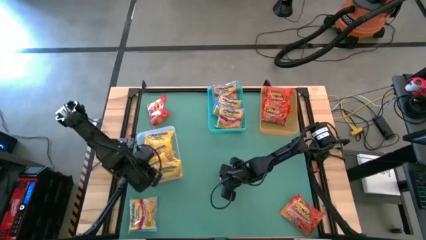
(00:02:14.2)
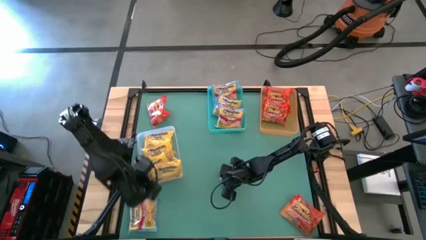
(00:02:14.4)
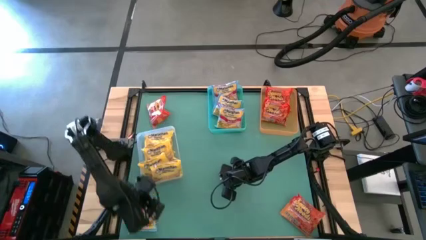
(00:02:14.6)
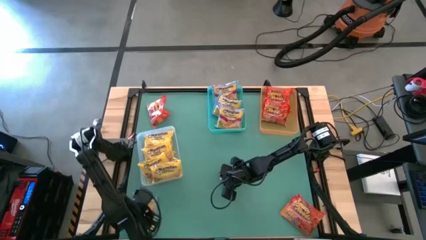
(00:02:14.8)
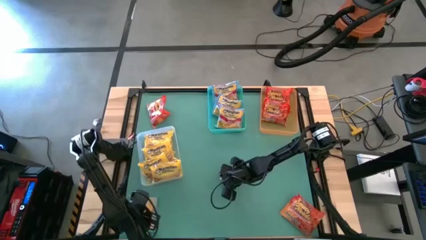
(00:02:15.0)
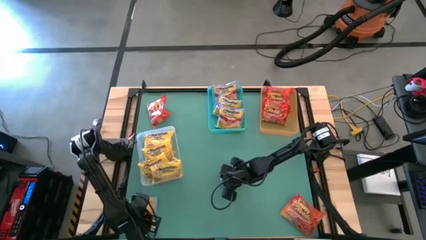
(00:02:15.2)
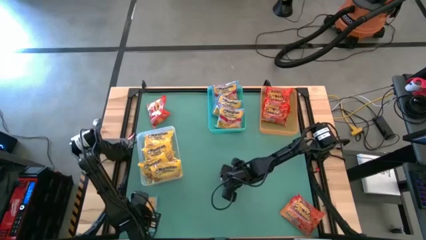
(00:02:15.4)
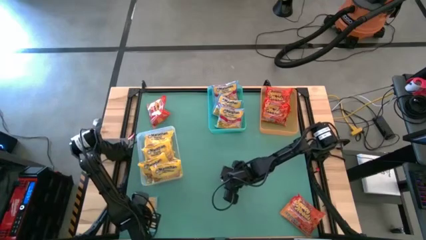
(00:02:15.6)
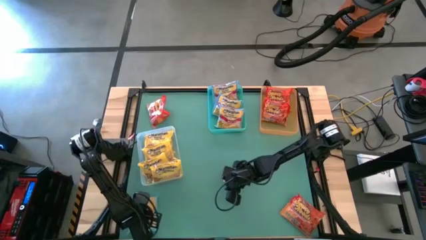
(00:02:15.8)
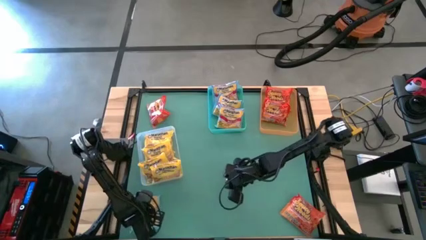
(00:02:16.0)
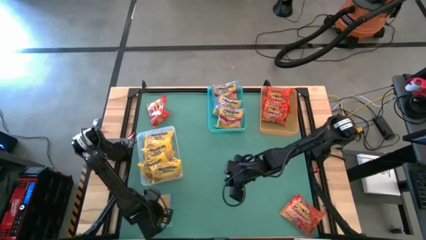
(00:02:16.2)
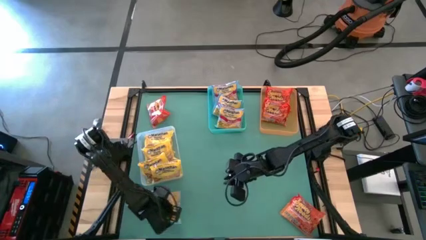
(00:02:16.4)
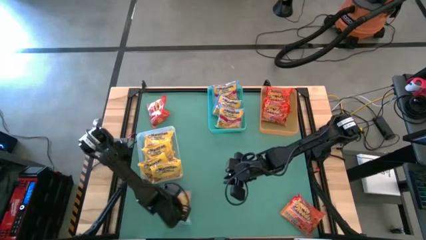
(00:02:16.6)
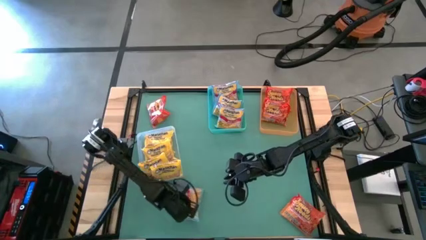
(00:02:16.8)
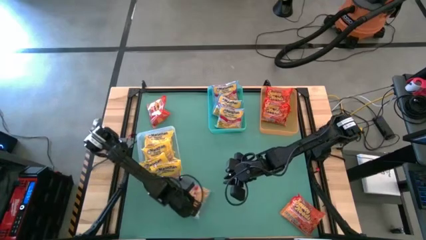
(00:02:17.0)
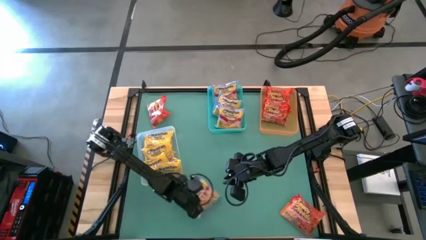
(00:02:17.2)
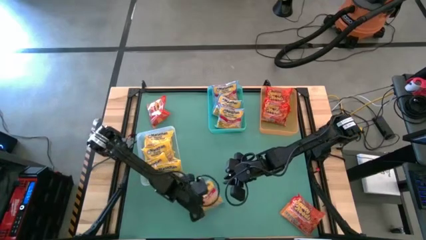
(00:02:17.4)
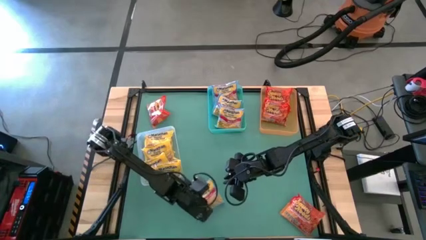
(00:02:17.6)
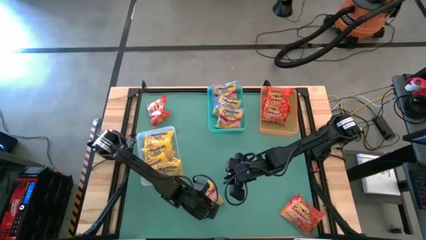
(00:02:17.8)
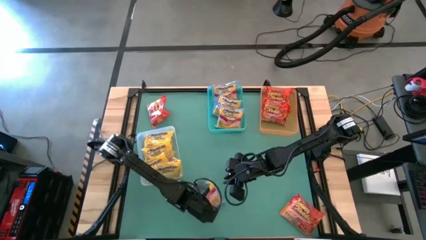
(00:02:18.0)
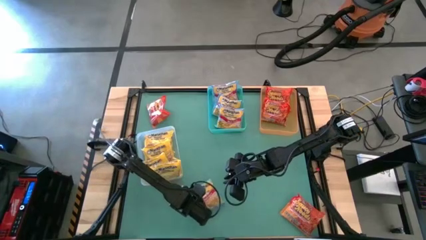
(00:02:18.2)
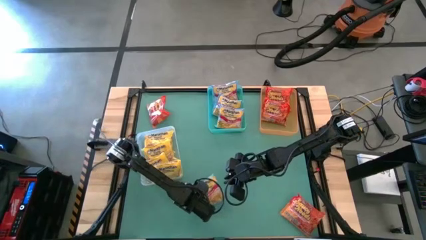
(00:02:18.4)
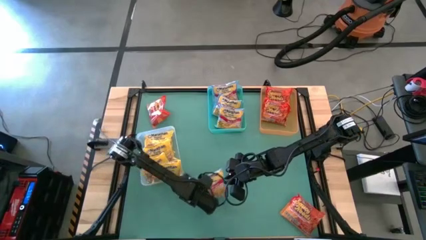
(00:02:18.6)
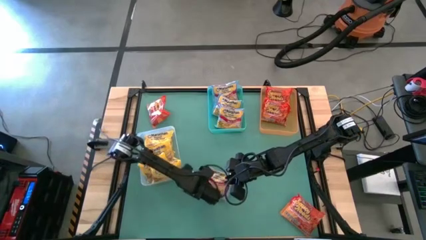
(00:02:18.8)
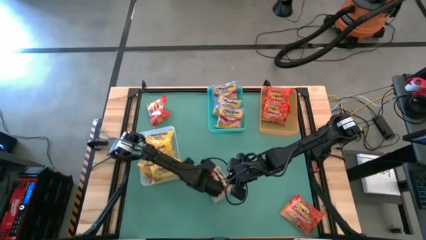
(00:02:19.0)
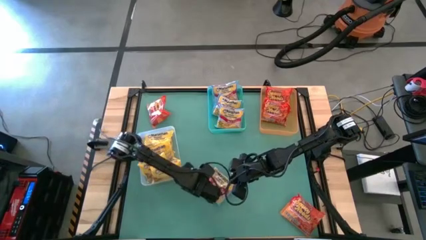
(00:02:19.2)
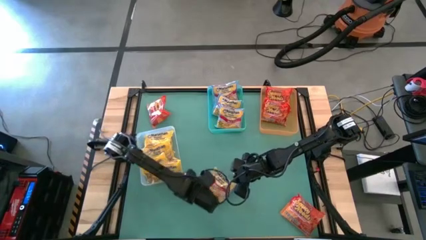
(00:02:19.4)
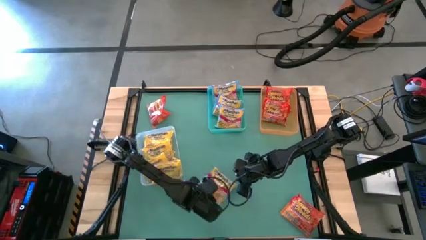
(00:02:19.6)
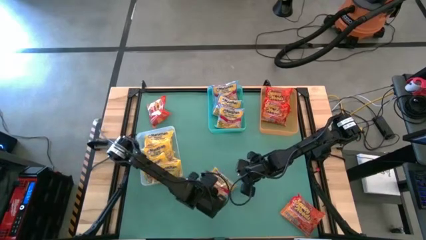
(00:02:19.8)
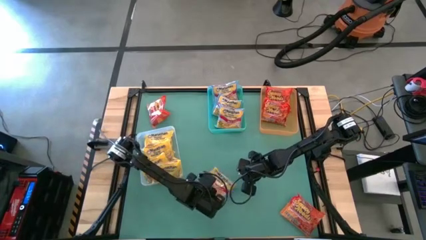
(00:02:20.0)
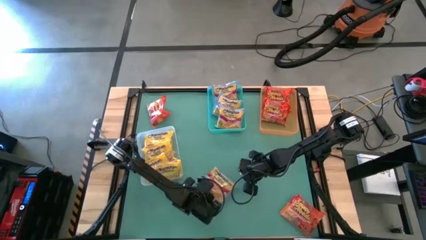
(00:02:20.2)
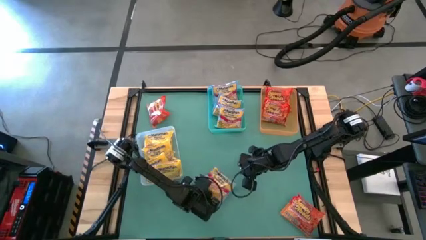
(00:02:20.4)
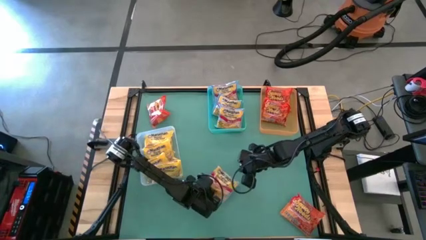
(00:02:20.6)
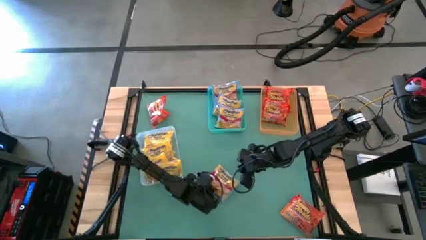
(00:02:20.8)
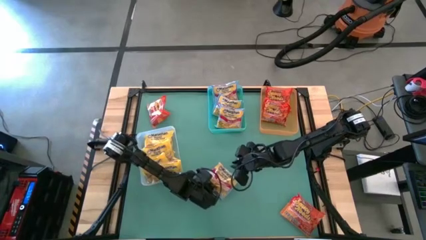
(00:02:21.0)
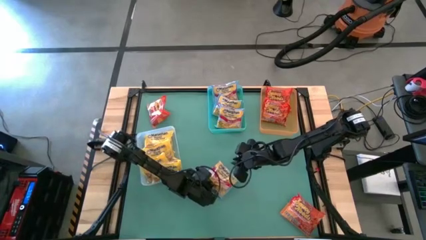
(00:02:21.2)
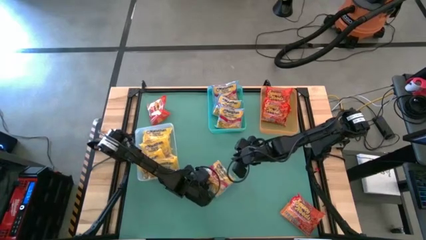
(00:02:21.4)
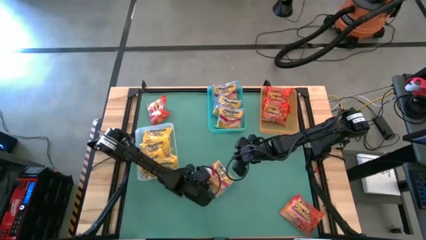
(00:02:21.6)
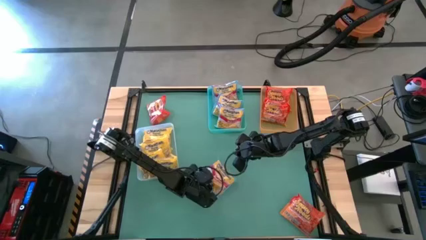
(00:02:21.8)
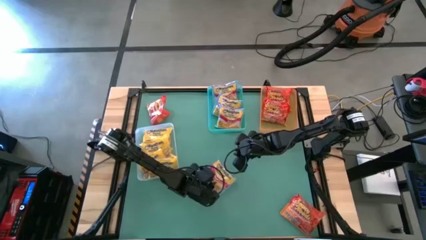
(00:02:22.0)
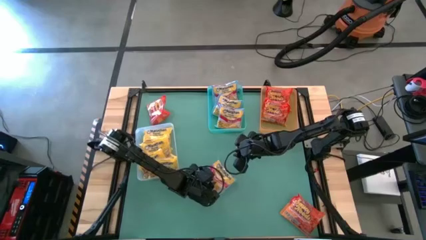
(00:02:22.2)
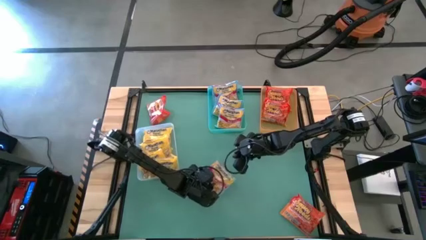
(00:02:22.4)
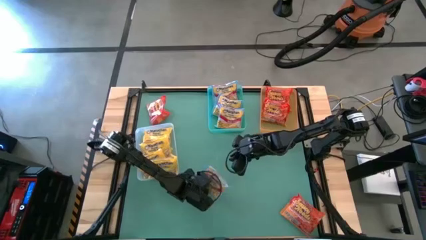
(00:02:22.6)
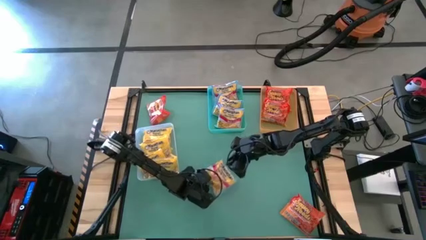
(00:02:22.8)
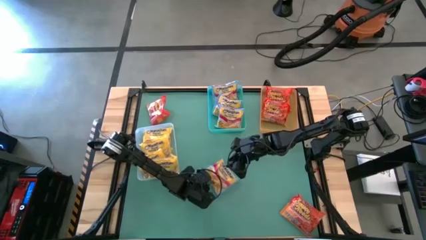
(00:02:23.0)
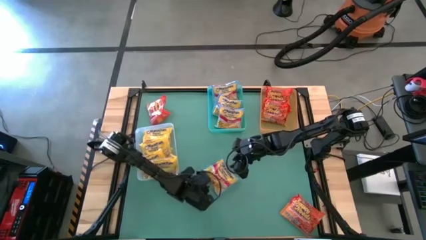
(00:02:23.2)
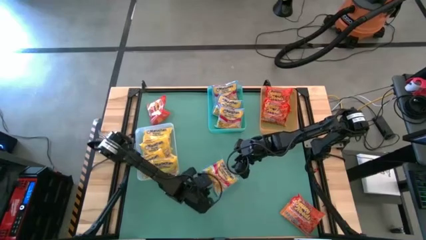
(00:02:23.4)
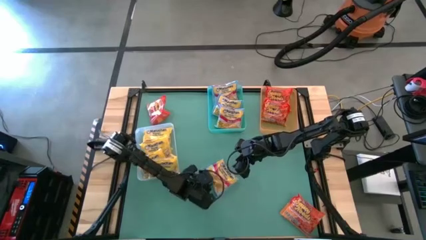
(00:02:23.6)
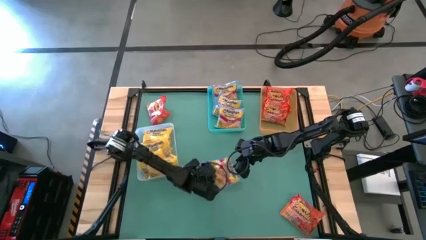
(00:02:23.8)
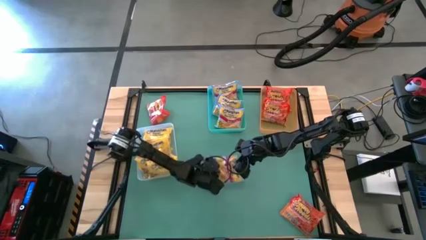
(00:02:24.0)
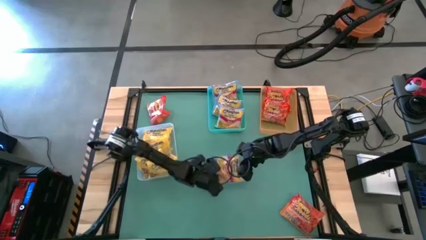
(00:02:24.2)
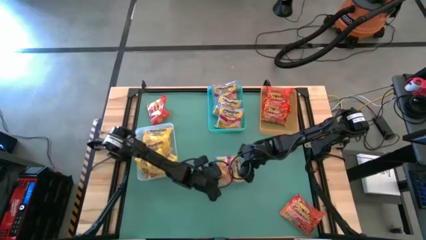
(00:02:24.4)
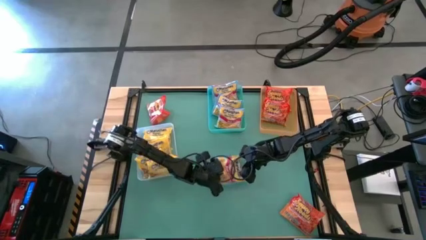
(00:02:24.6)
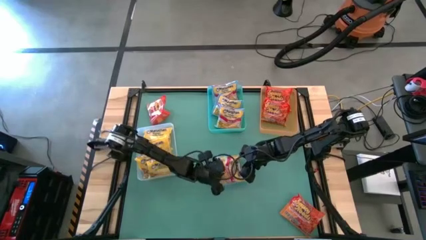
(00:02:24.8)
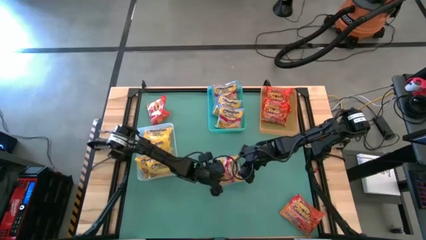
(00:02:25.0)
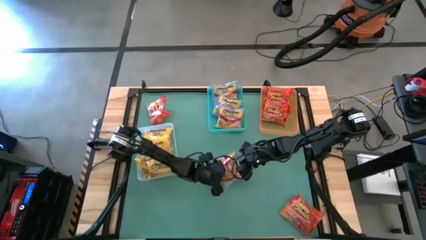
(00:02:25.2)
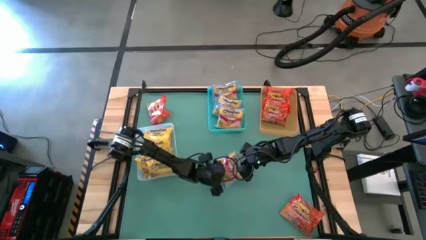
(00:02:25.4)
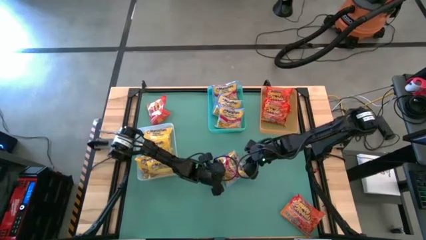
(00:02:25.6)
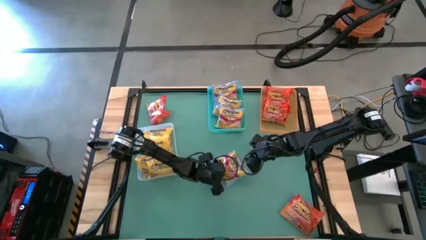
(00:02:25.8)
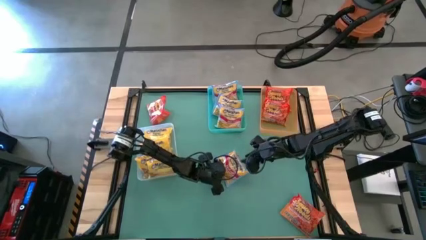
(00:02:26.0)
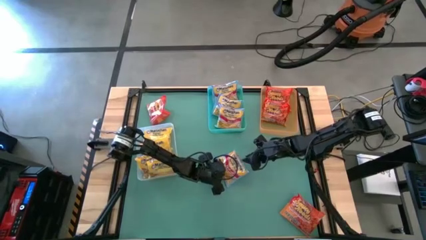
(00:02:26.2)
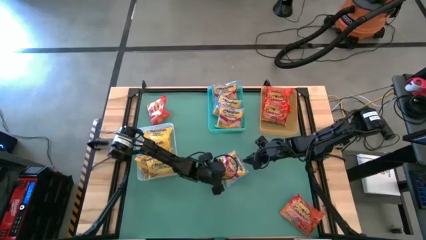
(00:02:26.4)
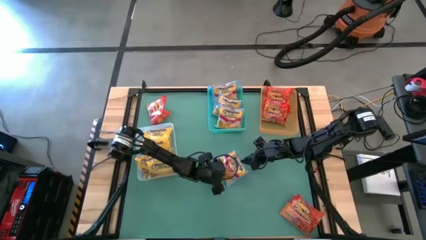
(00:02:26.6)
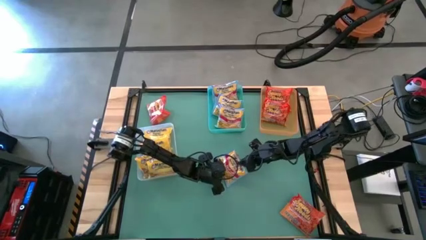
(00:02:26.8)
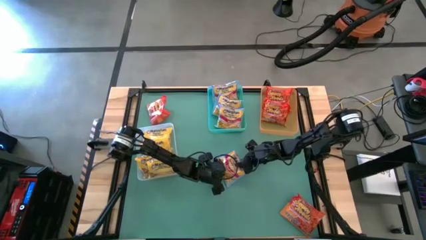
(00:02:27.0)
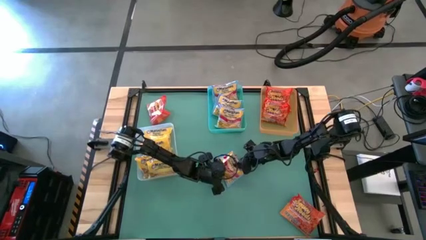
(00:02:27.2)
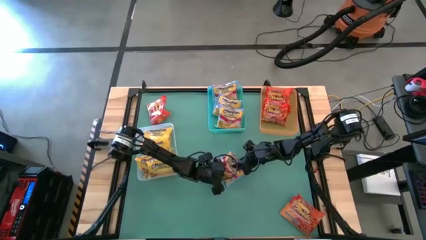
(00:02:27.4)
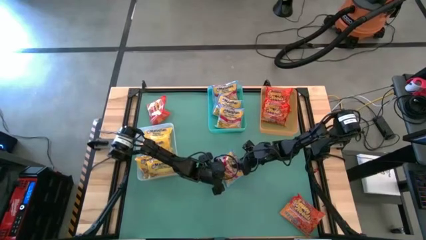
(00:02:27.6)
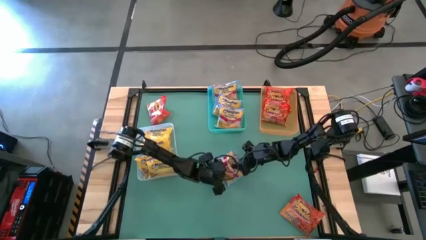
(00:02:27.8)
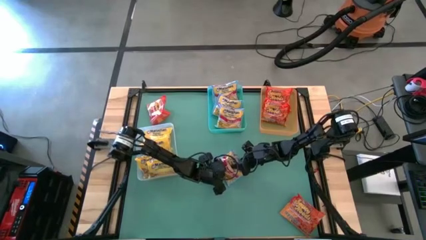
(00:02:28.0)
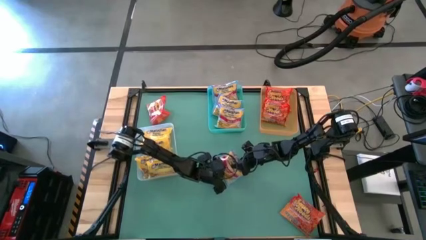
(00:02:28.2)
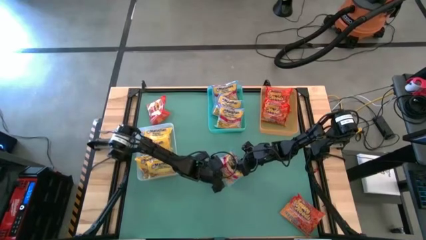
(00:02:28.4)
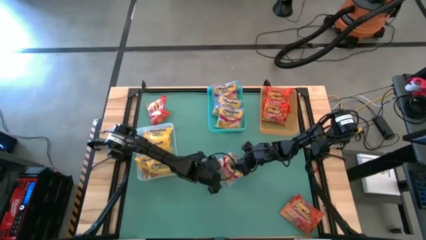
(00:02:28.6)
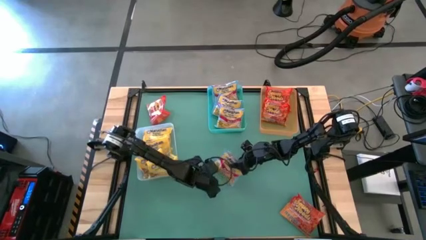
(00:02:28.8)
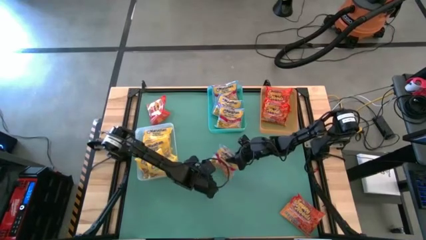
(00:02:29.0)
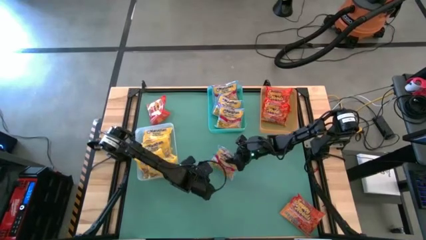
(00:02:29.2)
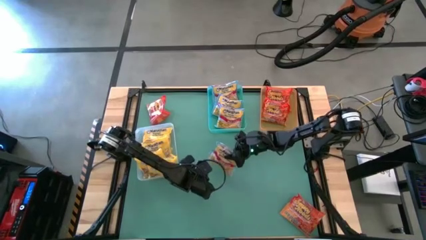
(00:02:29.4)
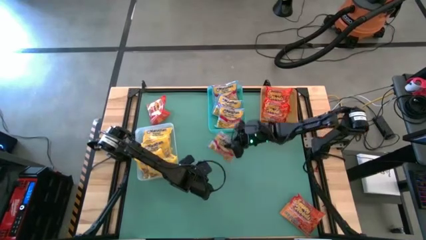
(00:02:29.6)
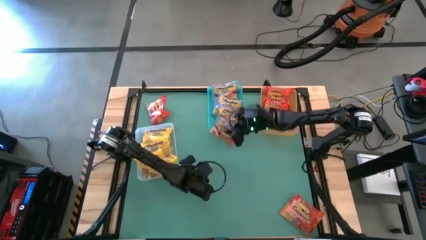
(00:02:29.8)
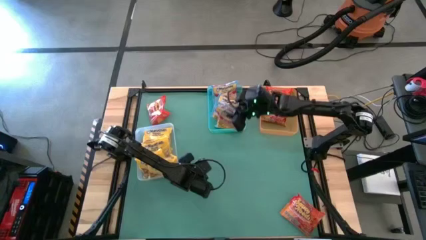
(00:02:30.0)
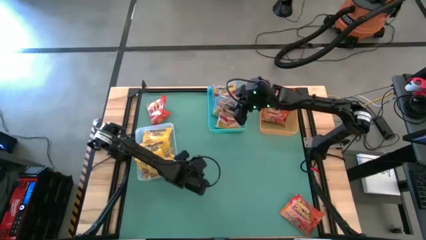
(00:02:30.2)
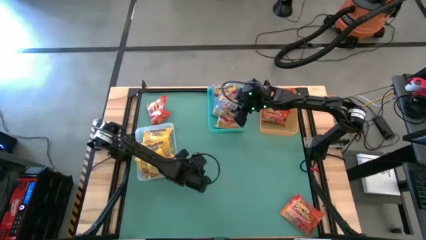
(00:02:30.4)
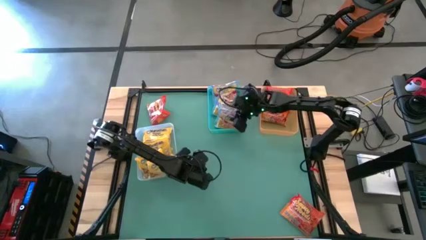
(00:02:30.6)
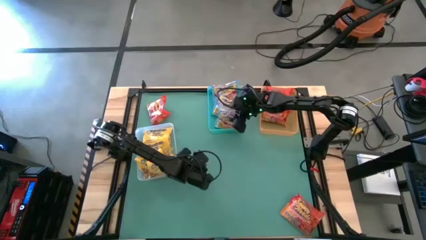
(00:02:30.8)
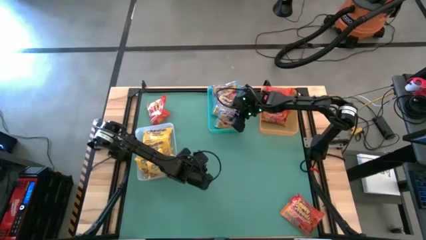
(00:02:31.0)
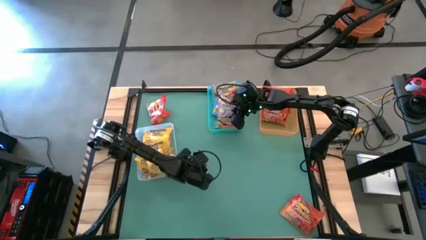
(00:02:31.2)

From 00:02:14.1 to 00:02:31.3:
Task: Sort Maruchan noodles
Put the blue noodle pack into the blue bin
